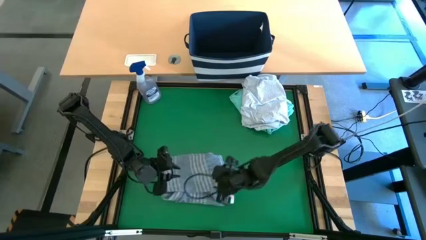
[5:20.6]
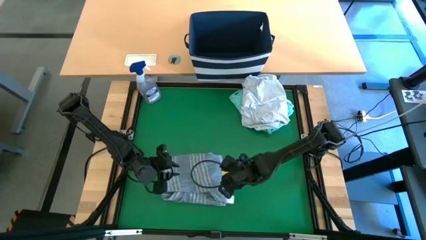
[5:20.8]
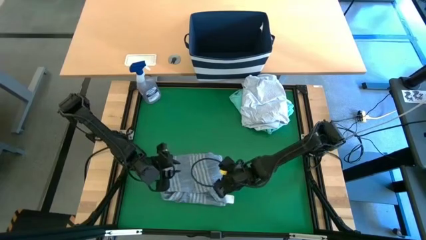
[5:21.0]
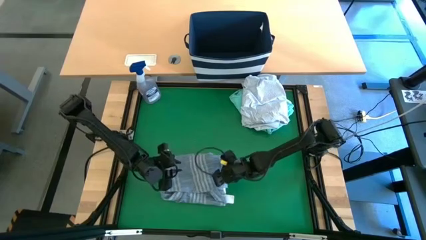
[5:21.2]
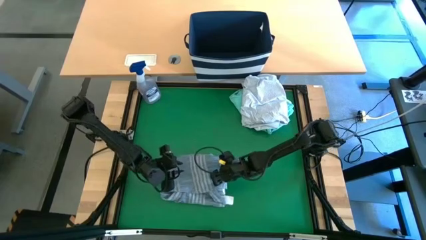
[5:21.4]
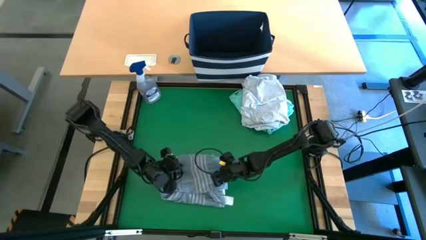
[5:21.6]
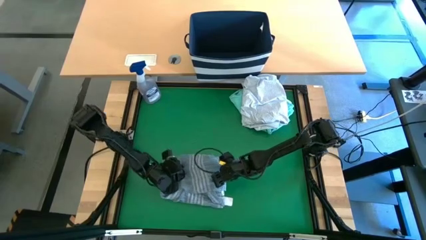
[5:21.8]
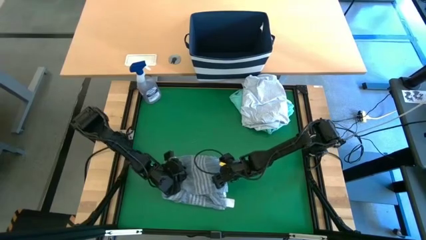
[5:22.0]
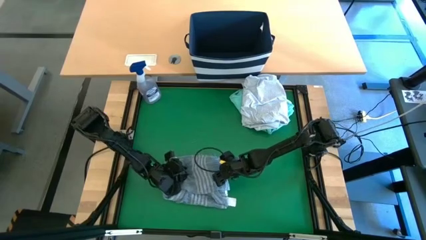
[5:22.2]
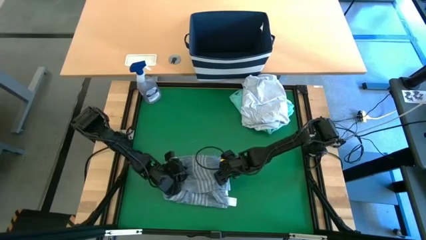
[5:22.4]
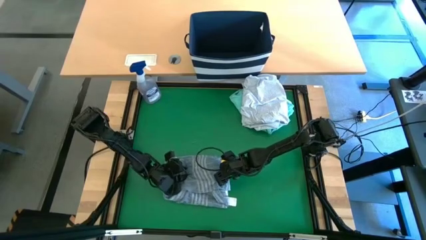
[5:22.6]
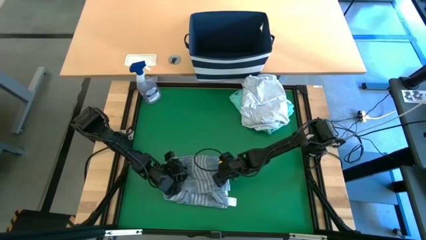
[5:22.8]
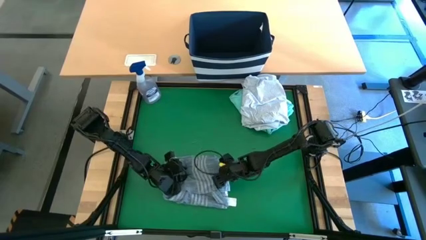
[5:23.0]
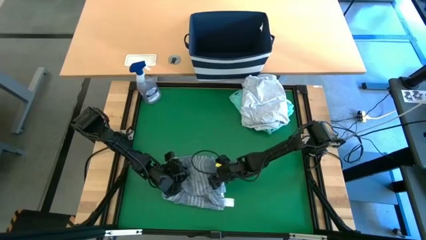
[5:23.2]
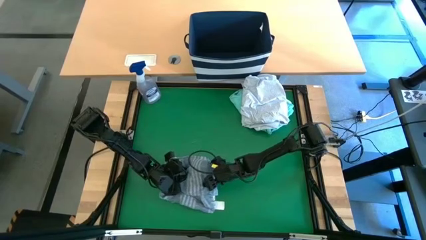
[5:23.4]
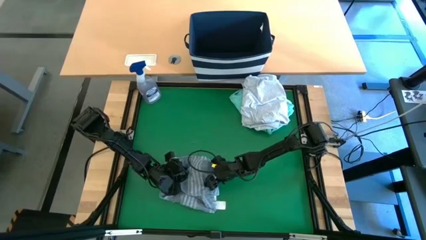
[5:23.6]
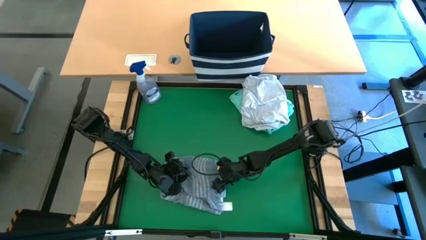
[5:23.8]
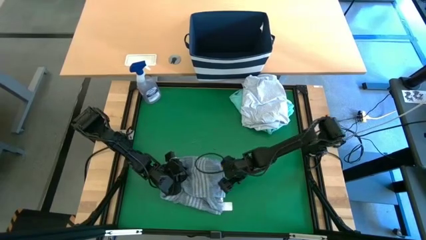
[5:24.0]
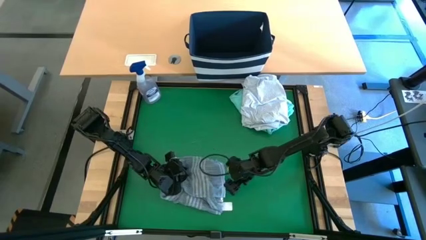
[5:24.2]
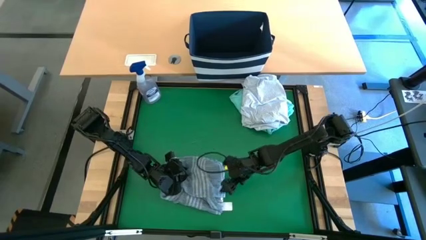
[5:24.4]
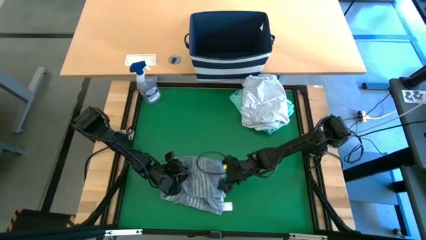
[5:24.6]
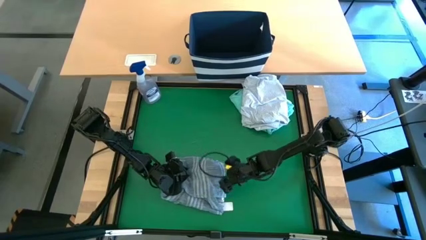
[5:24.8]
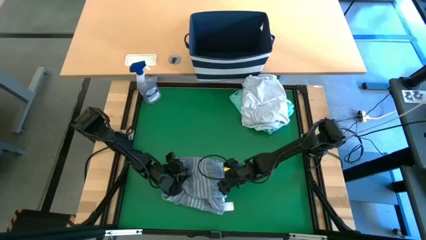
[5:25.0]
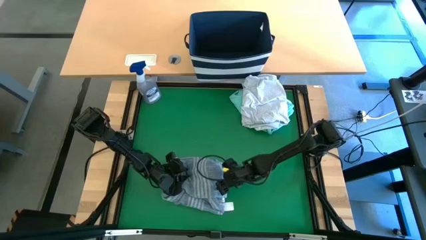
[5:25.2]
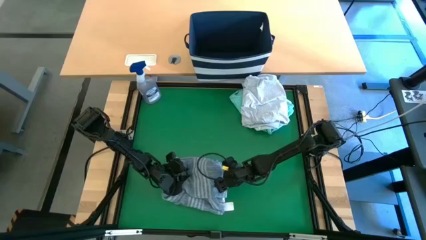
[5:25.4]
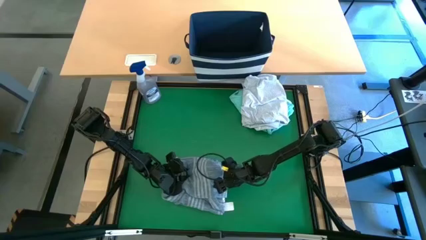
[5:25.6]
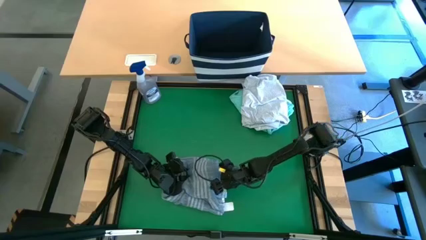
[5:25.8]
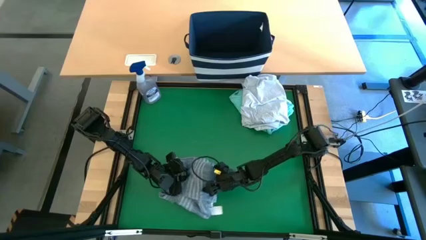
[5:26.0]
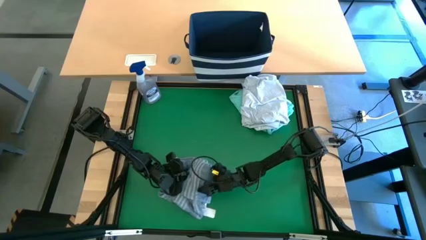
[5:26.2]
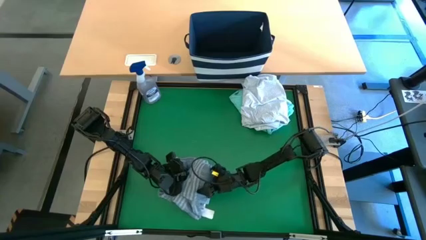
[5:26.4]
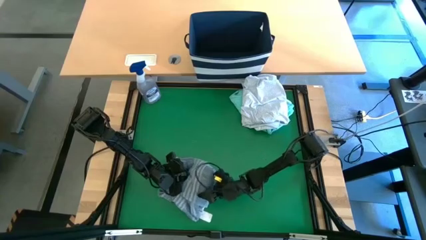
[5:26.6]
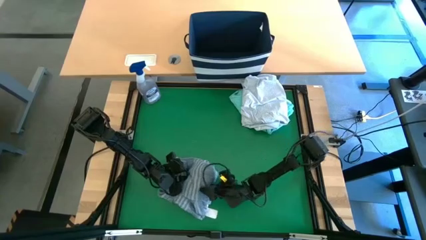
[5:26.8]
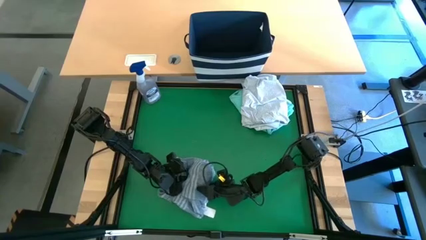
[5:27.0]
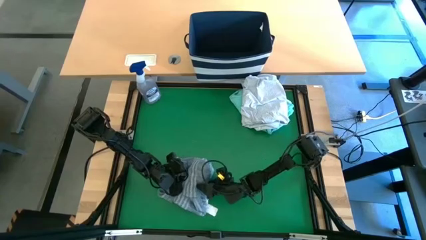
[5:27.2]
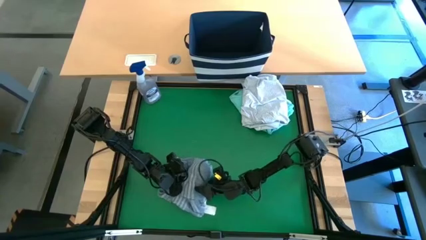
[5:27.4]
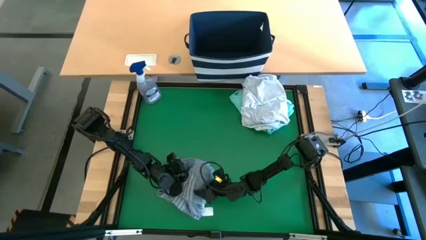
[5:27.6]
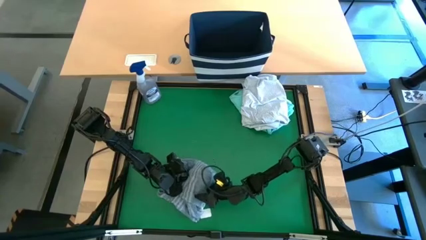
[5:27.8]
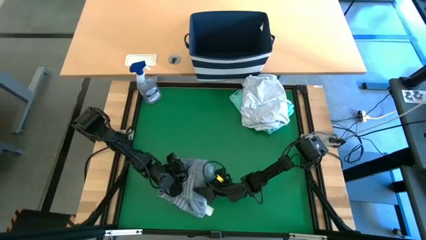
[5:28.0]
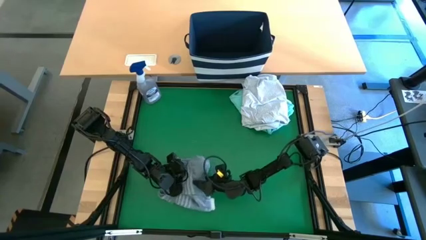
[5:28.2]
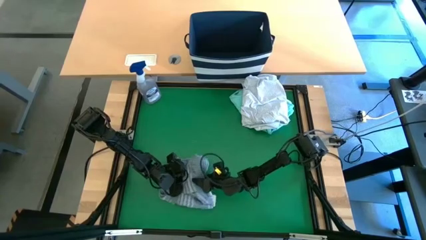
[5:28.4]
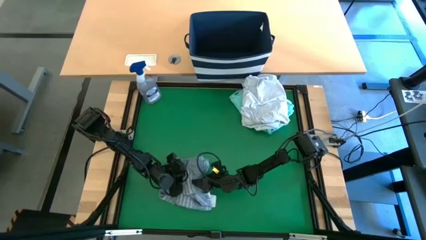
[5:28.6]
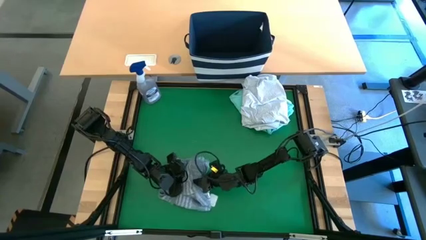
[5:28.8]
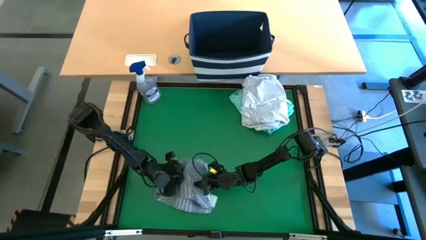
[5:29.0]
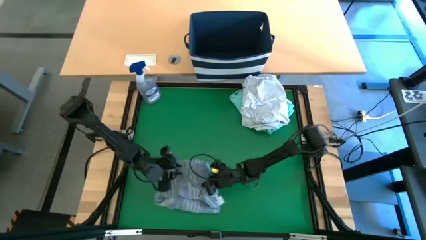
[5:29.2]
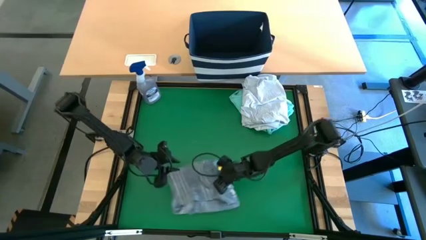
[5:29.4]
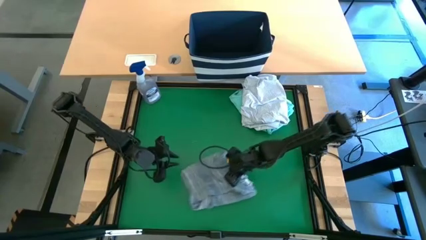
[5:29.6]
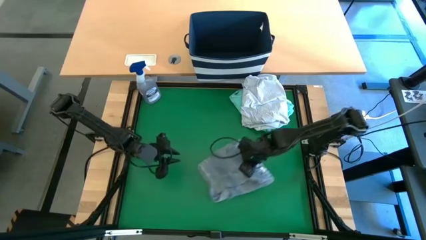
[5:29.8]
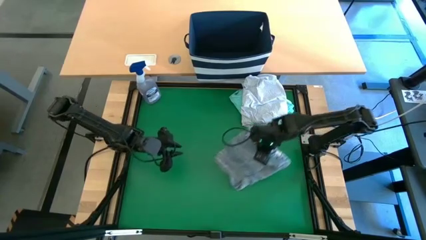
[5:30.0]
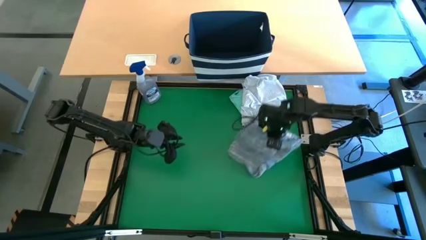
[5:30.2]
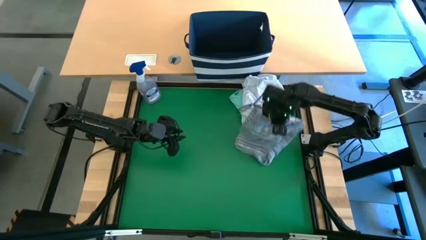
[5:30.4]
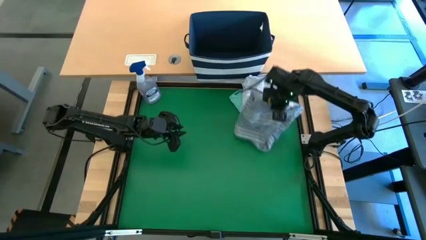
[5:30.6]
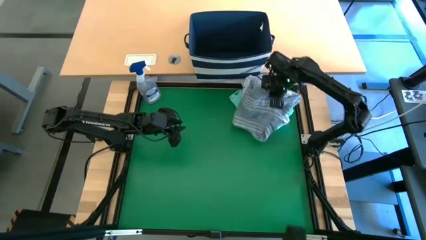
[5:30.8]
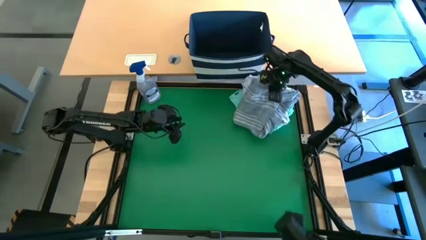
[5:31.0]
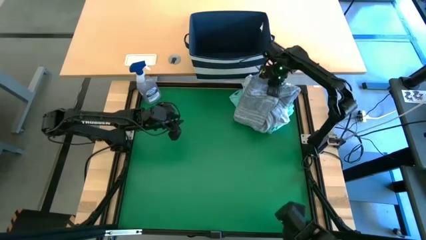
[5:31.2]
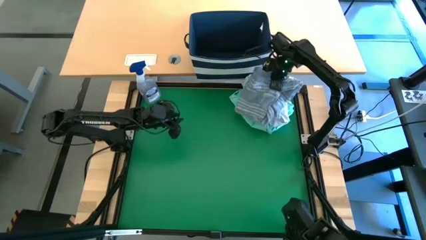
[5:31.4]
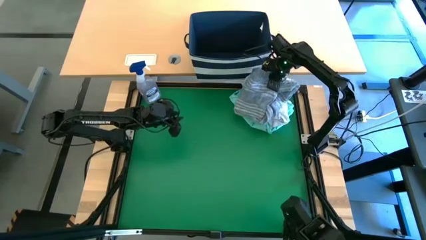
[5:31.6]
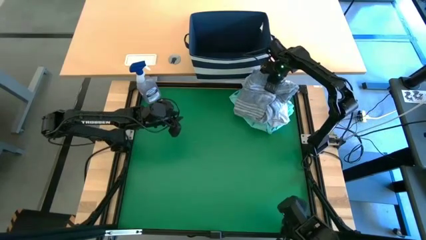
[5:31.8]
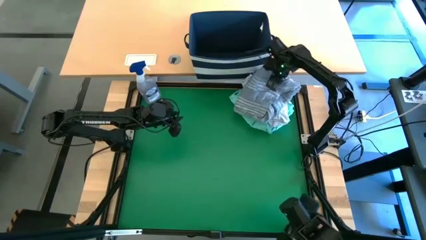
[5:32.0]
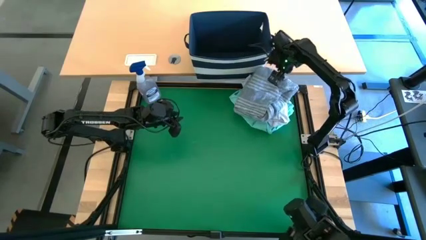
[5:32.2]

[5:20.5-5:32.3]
Task: Fold laundry
Stack the blue polo shirt on top of the white polo shirt

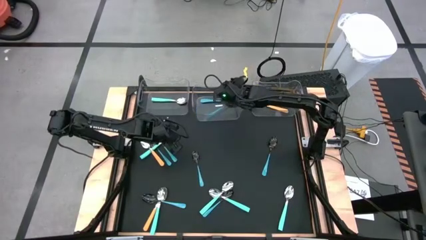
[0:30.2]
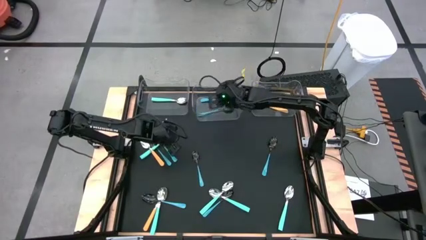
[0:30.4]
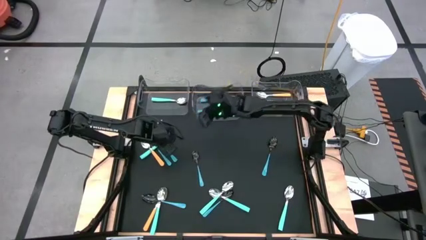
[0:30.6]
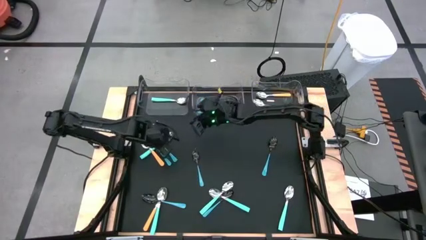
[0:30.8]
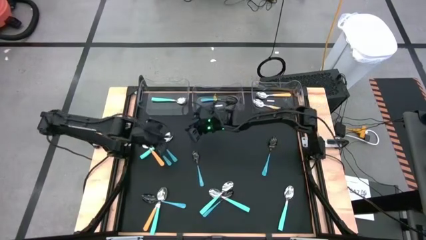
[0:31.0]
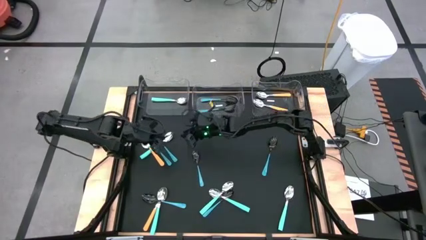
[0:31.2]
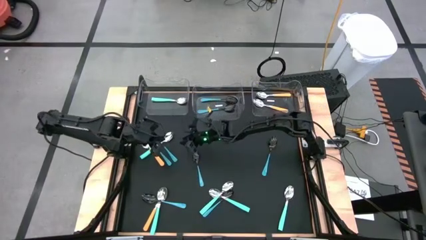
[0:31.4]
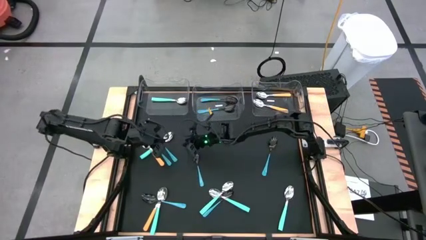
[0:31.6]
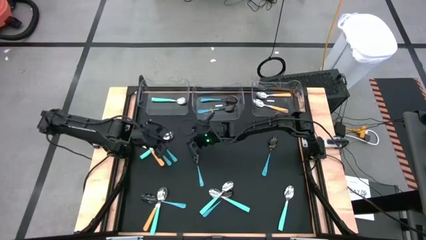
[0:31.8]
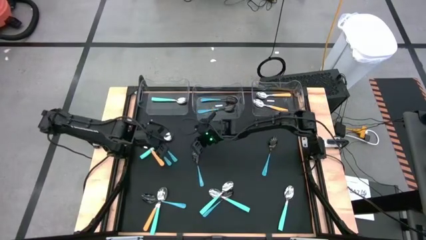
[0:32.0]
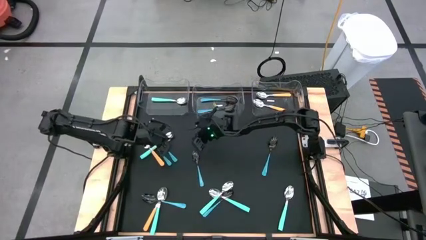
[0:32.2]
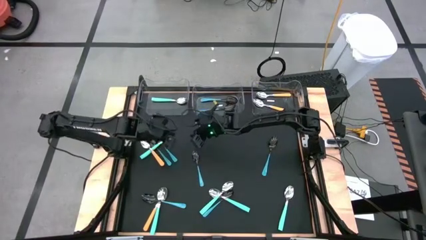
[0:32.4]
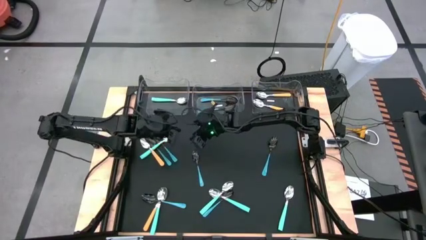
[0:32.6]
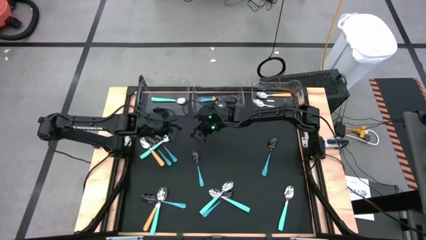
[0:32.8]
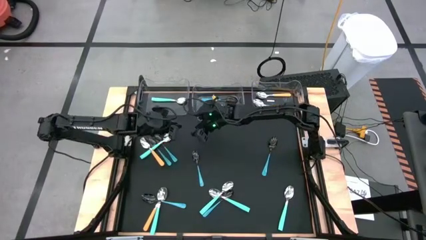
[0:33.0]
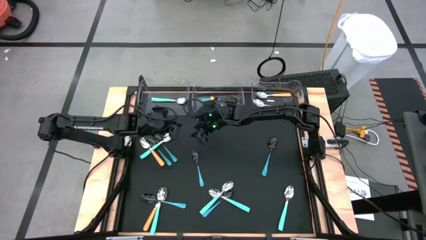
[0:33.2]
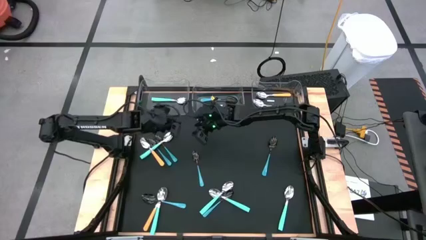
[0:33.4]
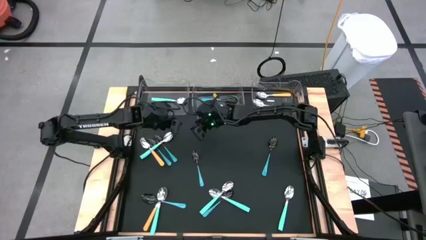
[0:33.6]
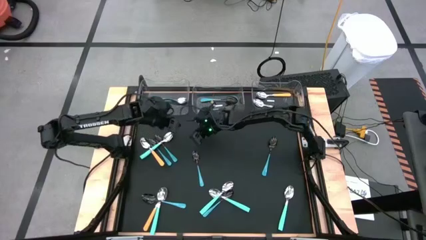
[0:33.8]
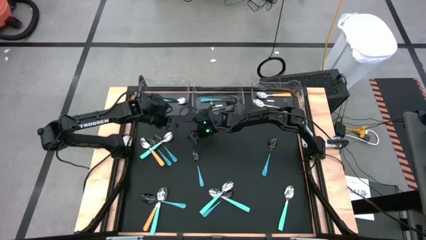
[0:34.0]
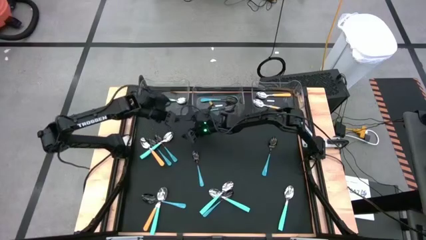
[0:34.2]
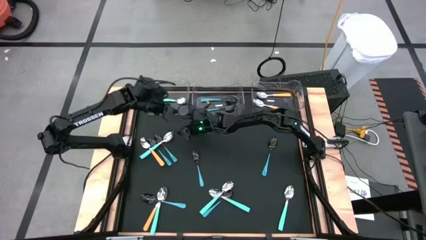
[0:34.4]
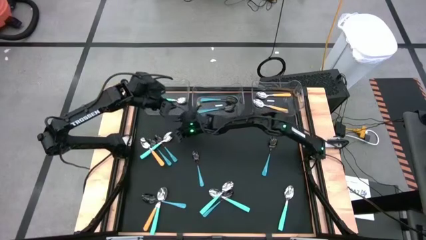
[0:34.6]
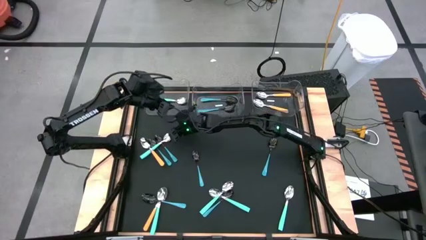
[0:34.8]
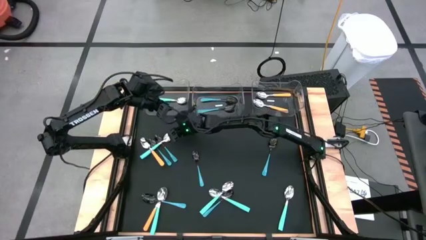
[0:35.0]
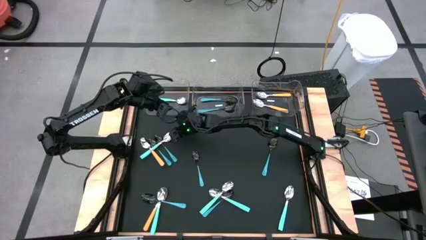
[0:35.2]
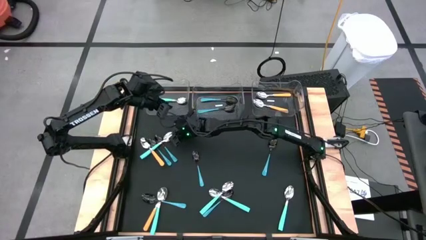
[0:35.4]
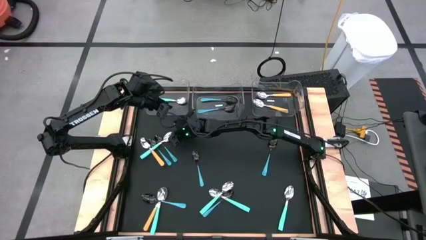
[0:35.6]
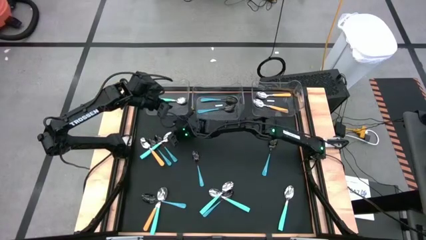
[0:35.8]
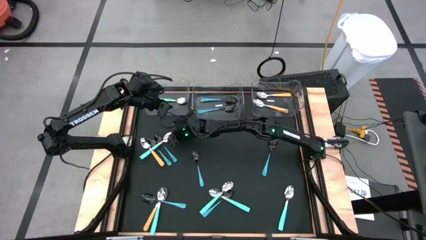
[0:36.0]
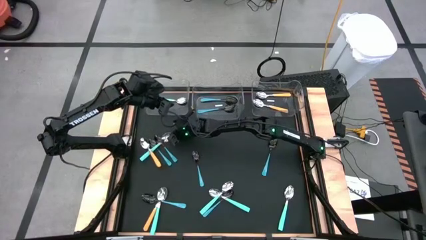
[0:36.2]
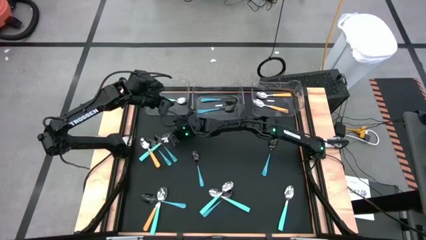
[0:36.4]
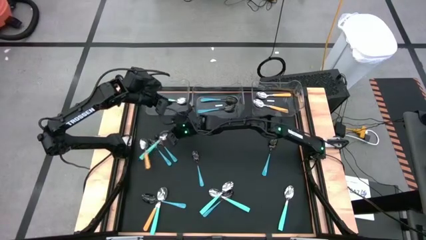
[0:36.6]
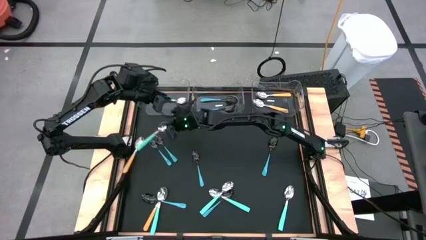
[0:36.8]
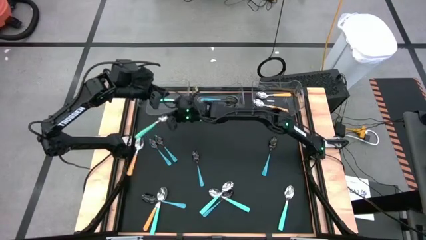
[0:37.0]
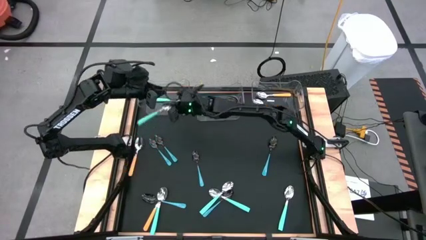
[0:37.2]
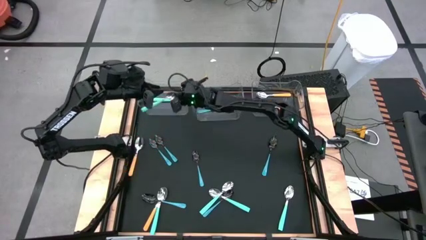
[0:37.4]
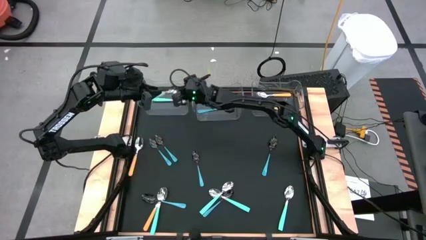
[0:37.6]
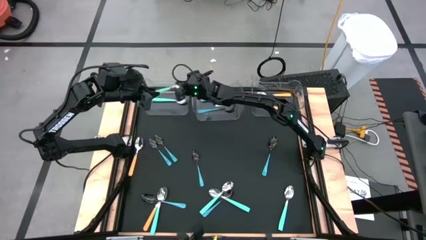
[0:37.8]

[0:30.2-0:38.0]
Task: Sort silverware by color (type)
Put the light blue spoon into the left transparent bin
